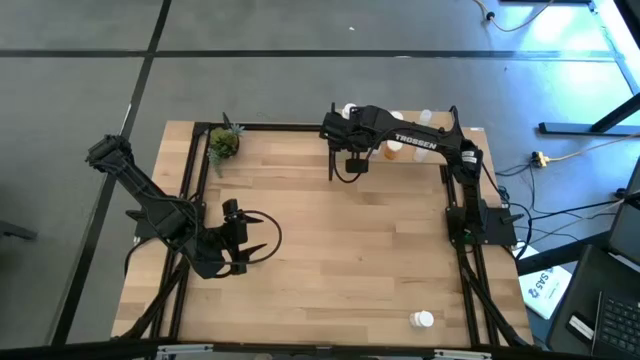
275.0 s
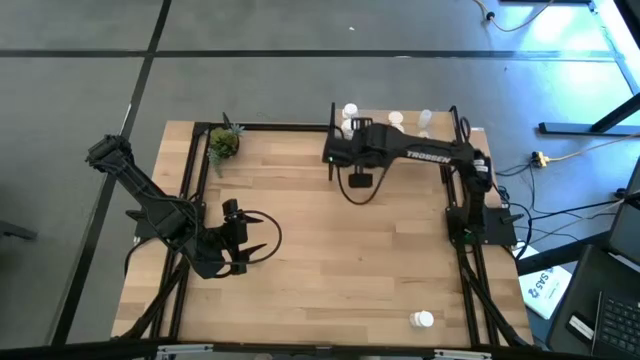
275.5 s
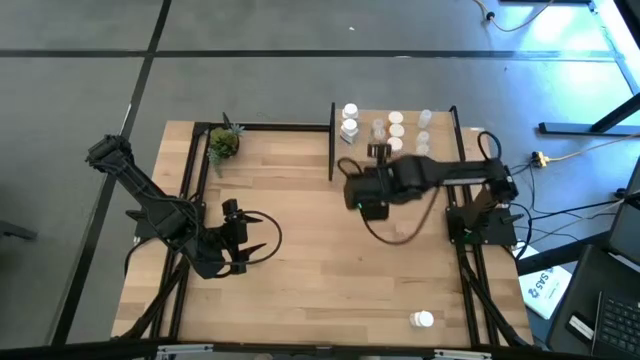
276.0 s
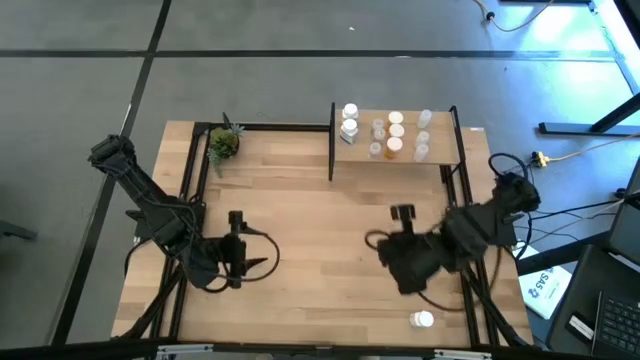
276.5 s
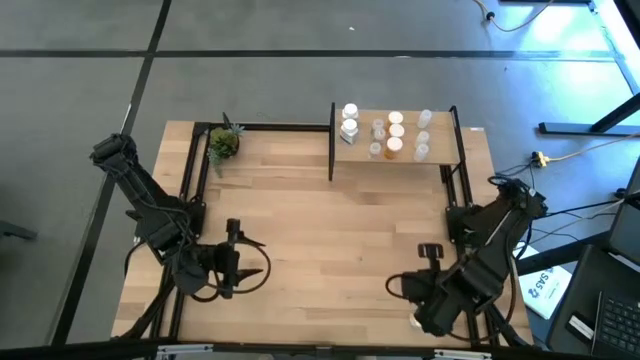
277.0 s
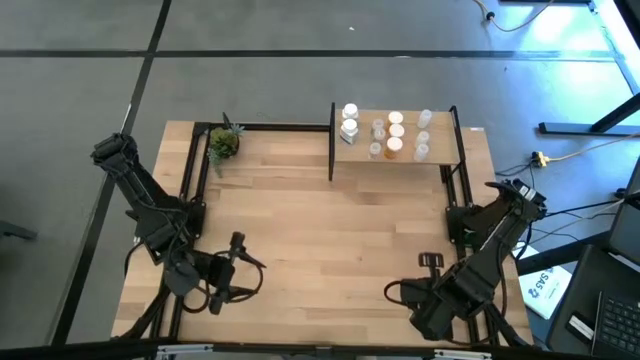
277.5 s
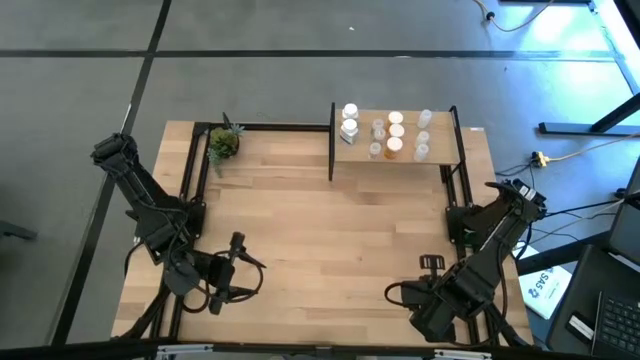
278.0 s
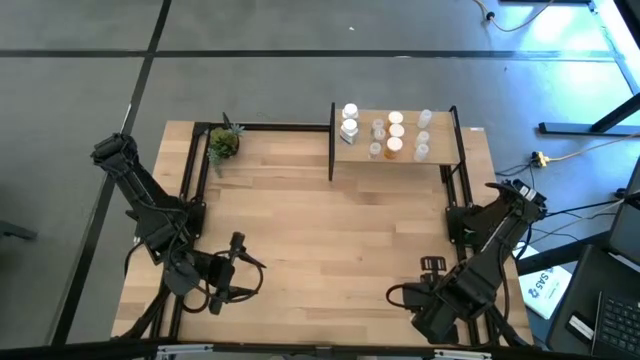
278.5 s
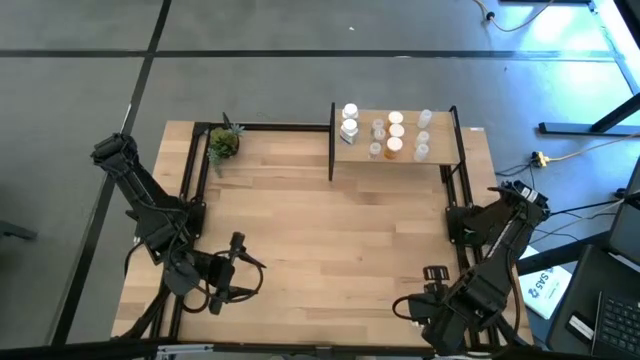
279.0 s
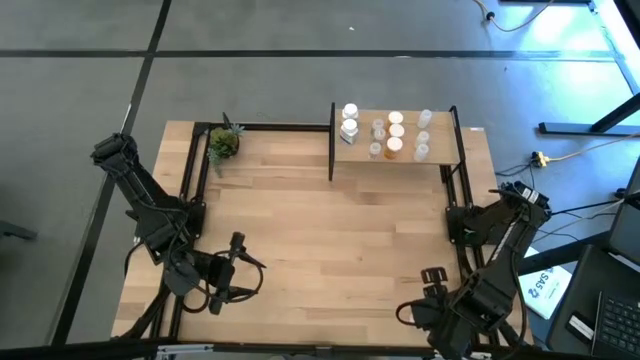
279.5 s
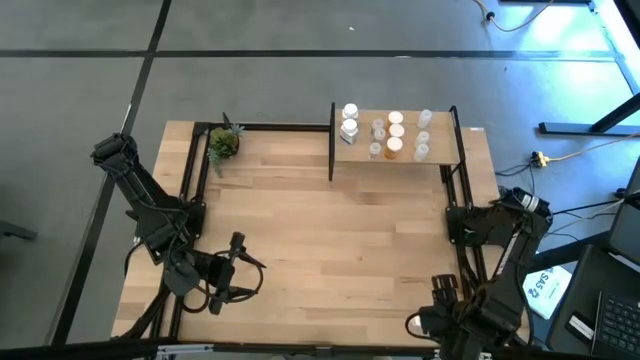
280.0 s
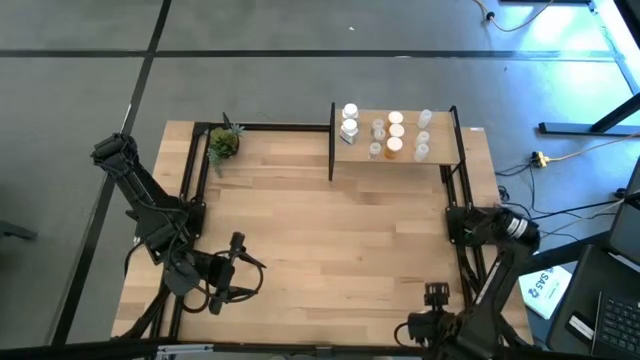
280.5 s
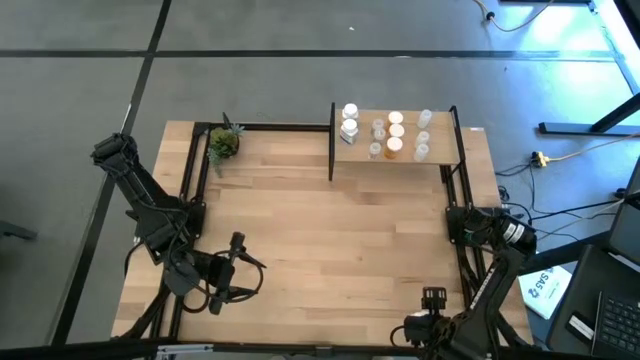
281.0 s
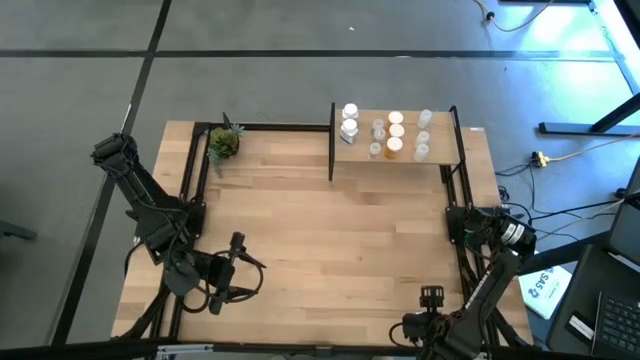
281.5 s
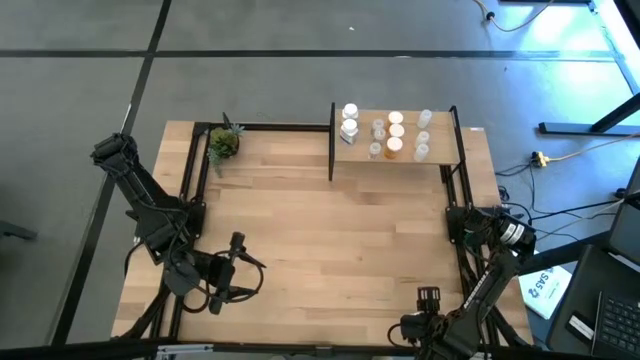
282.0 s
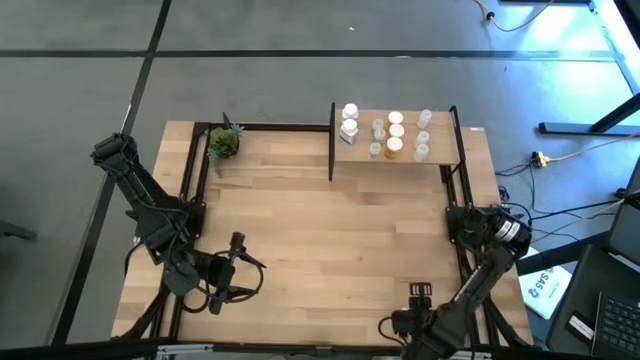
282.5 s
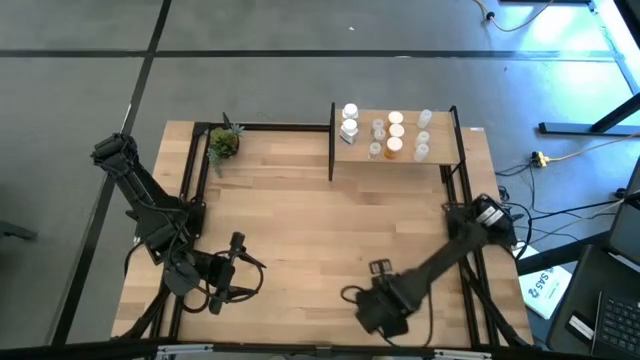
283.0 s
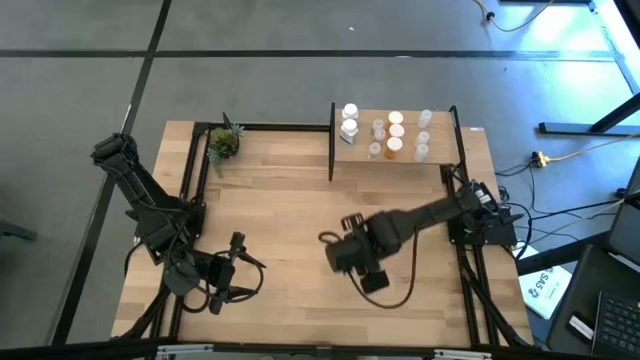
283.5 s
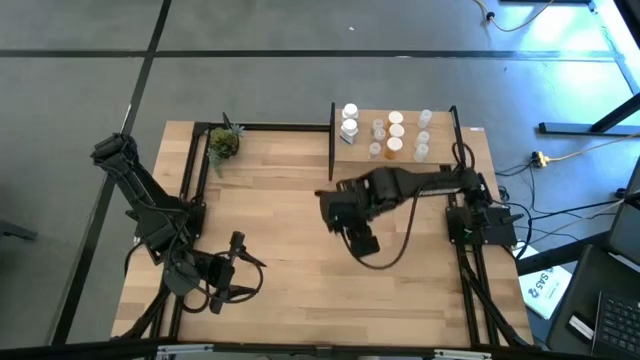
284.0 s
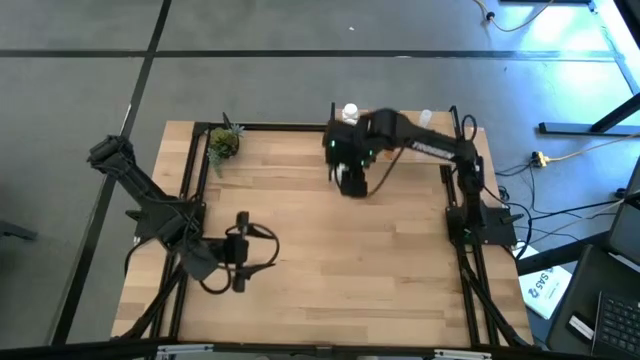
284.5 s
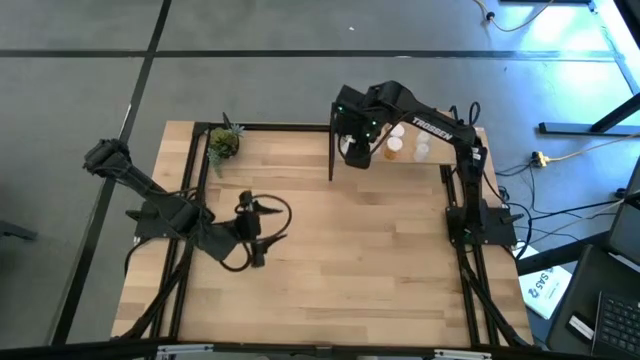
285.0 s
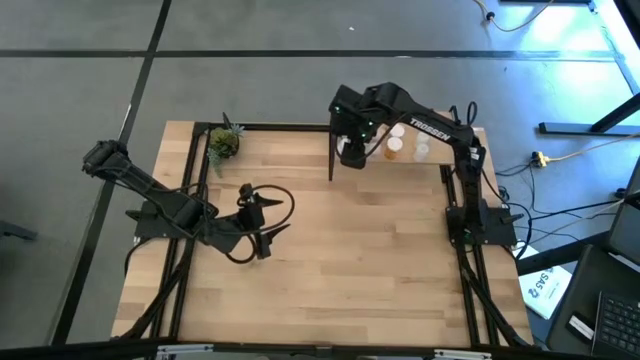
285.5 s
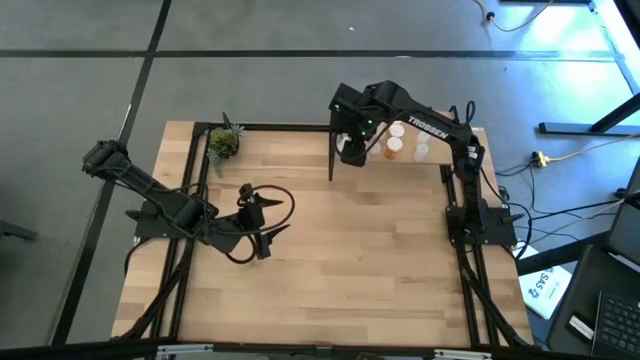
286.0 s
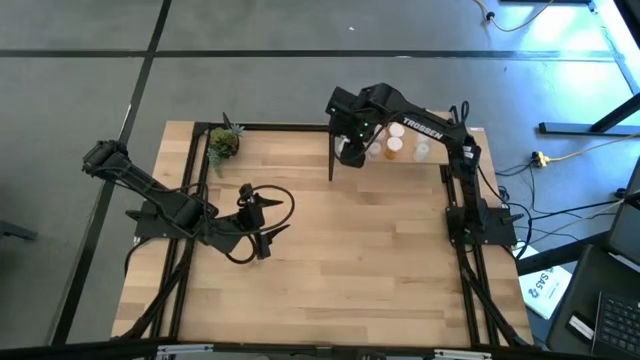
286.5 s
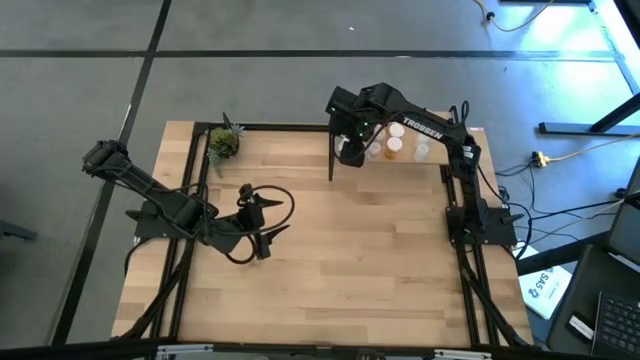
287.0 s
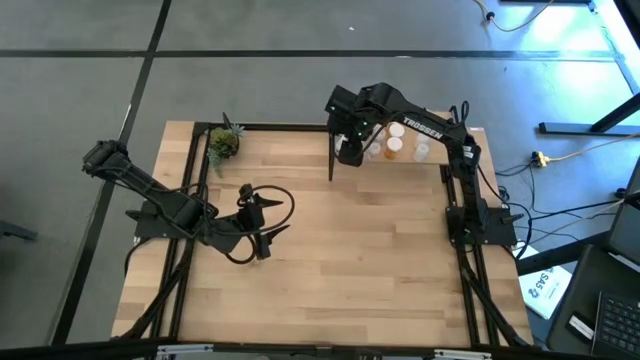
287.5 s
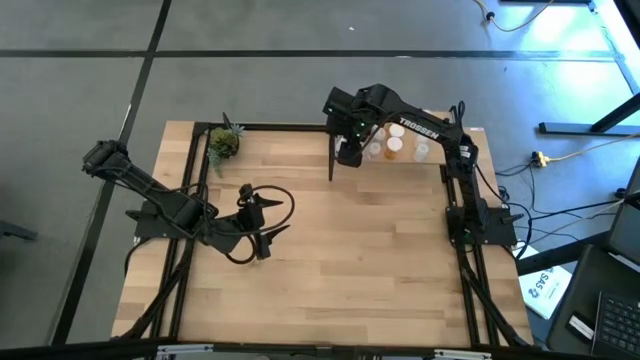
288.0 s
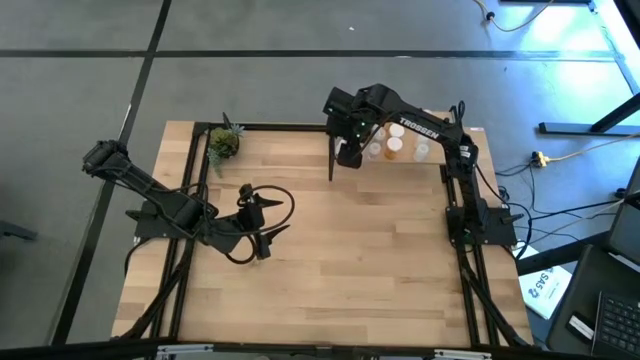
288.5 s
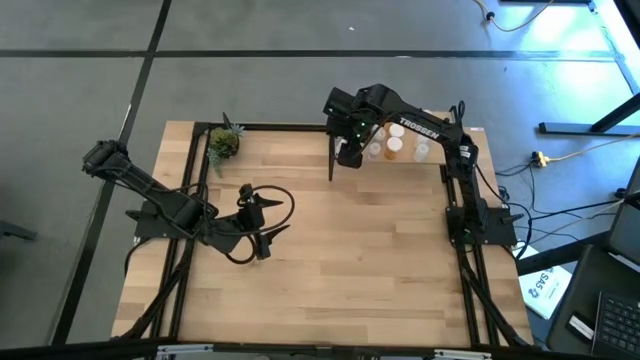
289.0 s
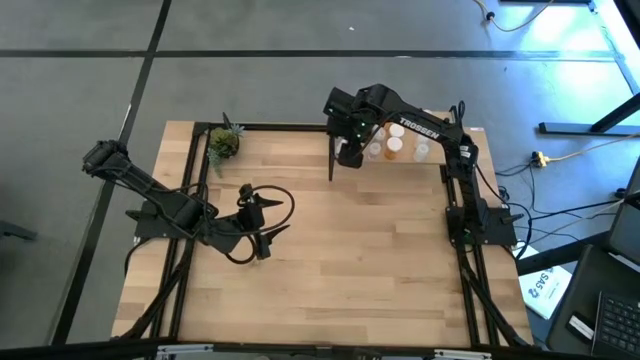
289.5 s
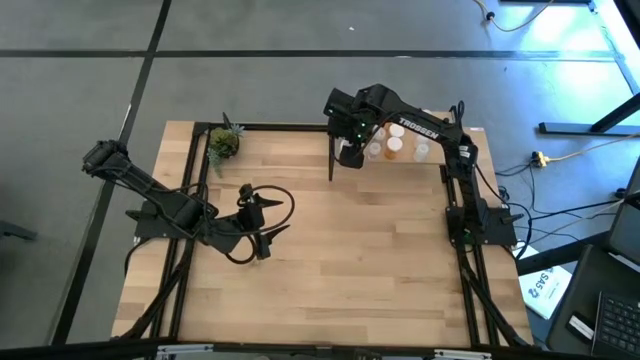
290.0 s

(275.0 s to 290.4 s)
Task: Pick and place medicine bottles onto shelf by color
Put the white pill bottle on the shelf aligned with the other white pill bottles

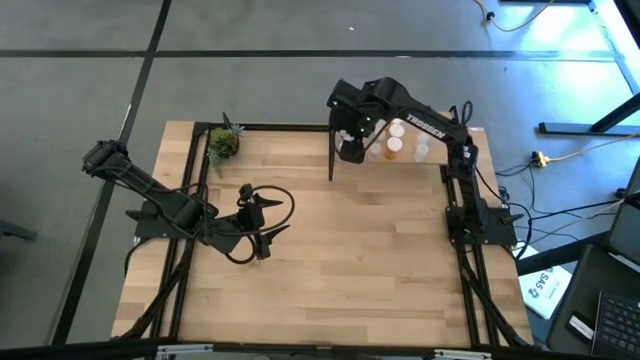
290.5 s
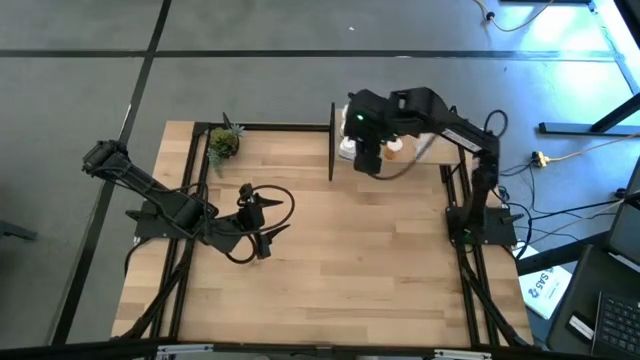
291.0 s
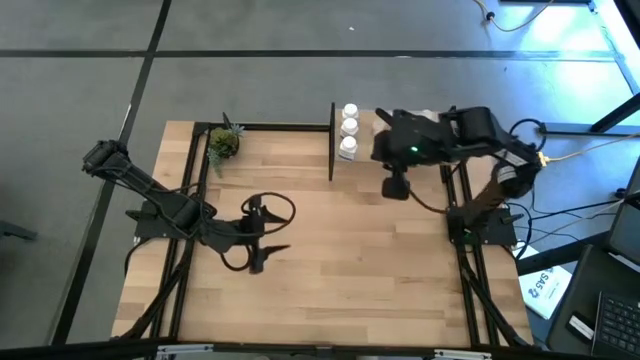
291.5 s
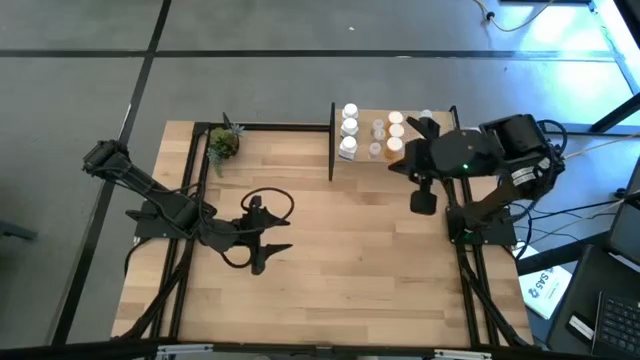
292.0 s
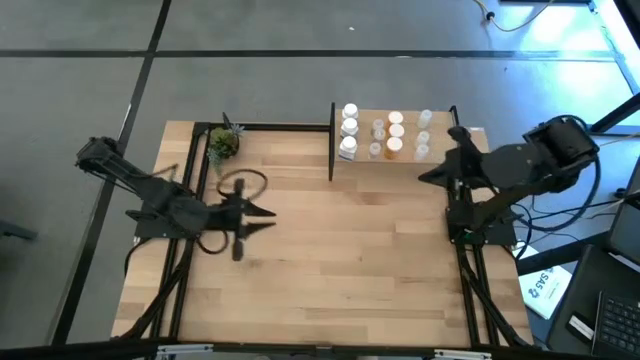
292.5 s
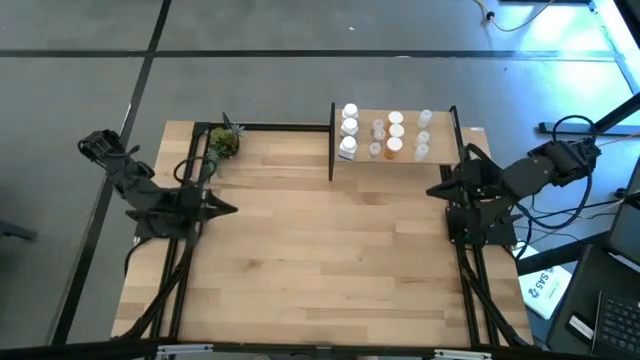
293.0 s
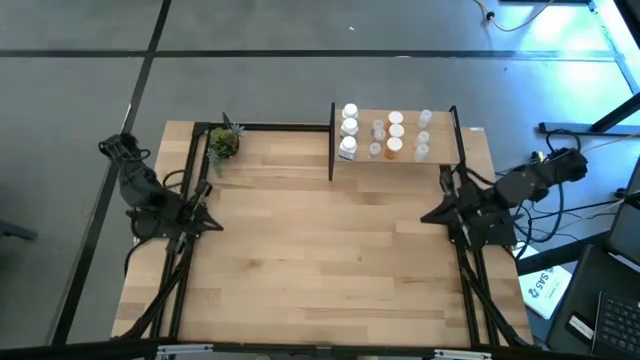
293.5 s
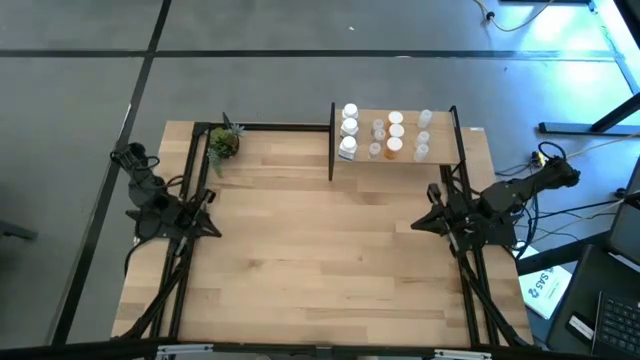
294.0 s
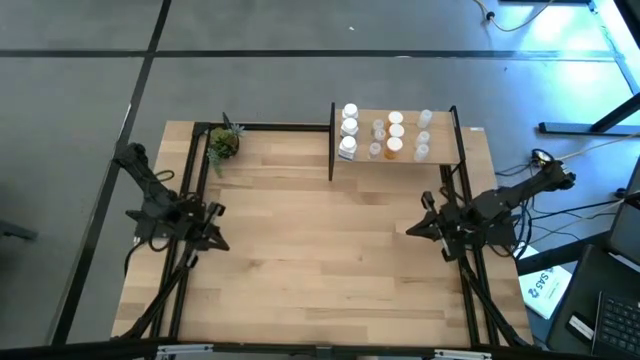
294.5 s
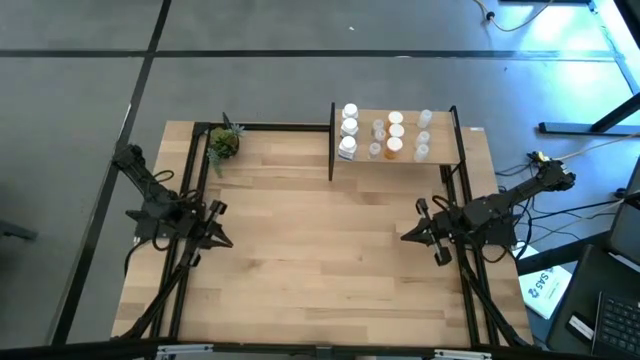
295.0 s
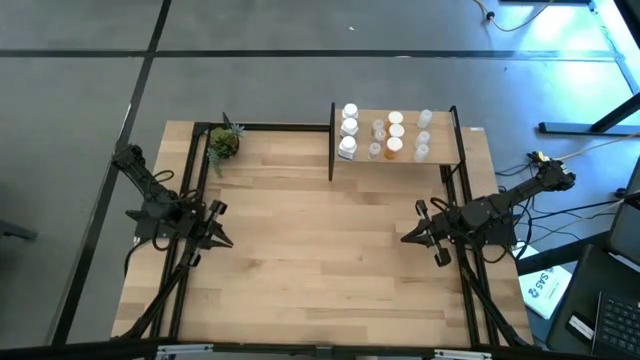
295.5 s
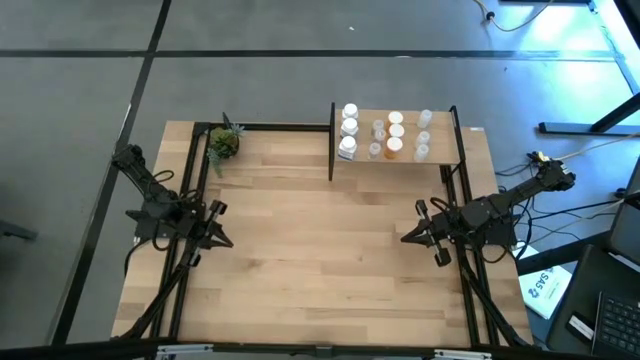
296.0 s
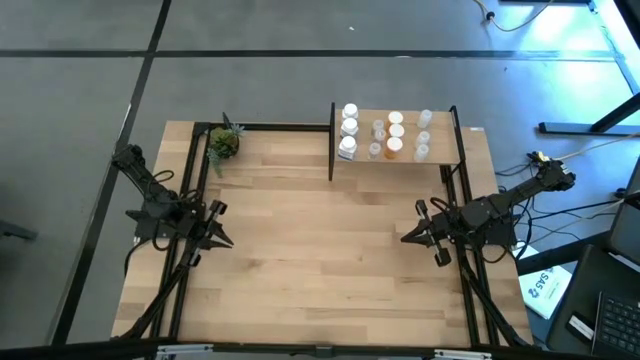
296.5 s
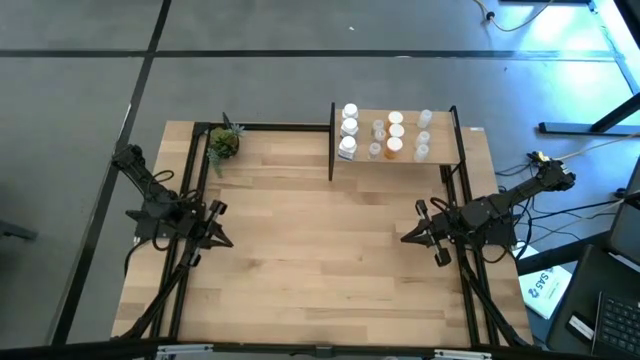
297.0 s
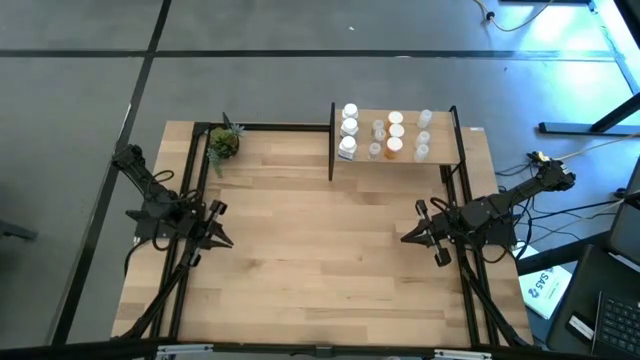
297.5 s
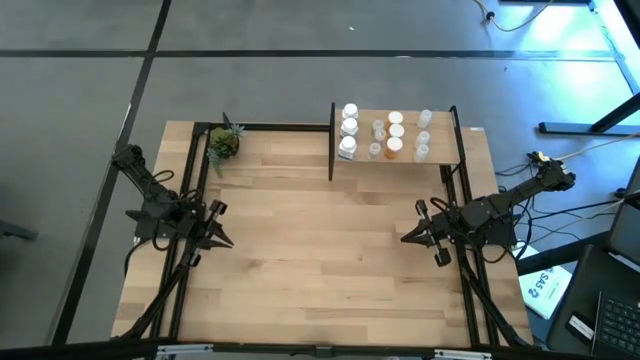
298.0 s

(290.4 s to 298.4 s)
Return to Home Position
